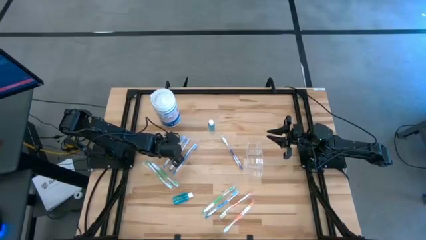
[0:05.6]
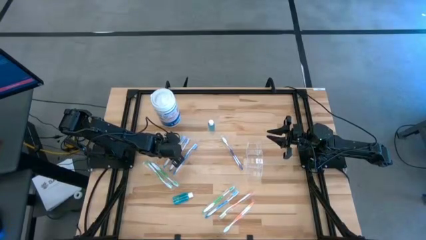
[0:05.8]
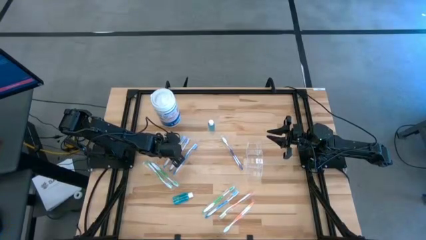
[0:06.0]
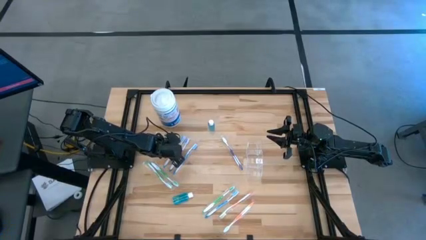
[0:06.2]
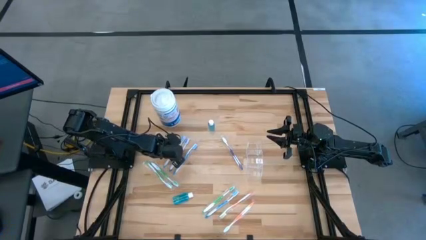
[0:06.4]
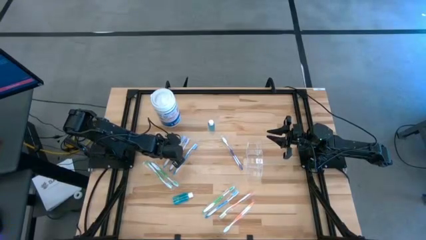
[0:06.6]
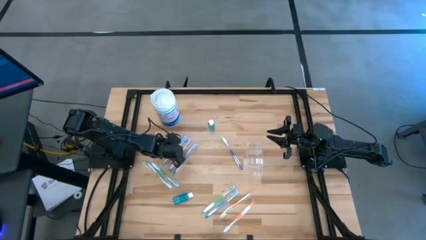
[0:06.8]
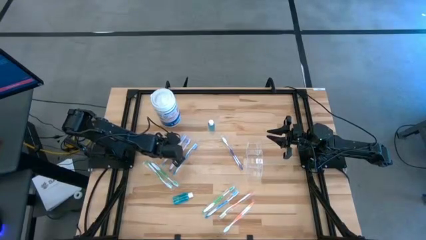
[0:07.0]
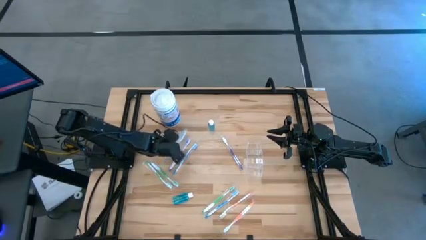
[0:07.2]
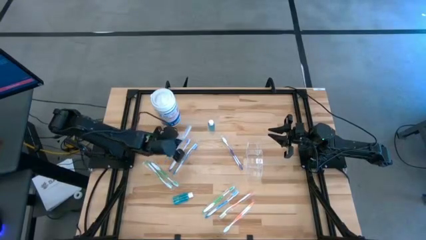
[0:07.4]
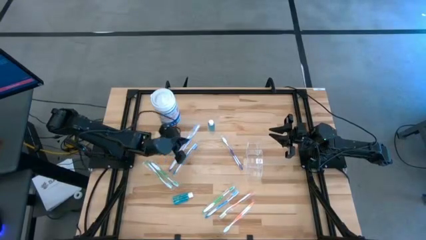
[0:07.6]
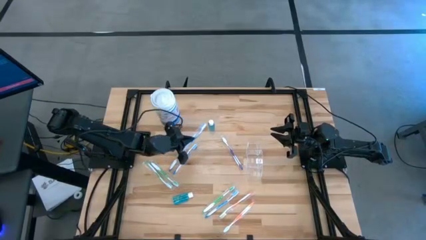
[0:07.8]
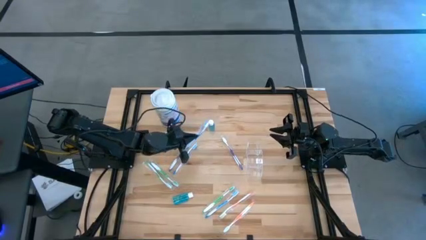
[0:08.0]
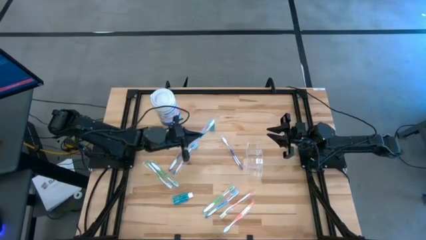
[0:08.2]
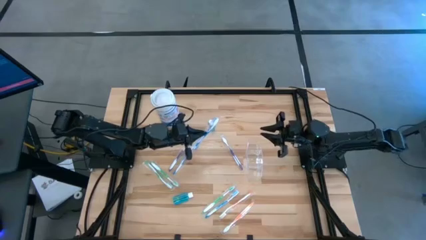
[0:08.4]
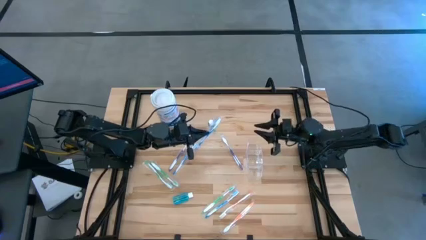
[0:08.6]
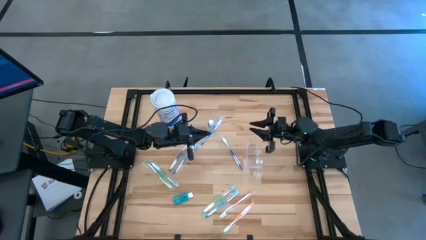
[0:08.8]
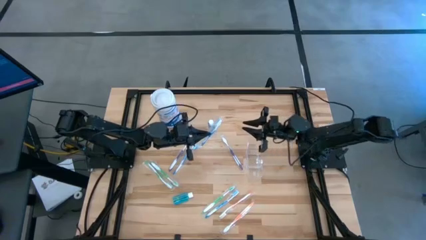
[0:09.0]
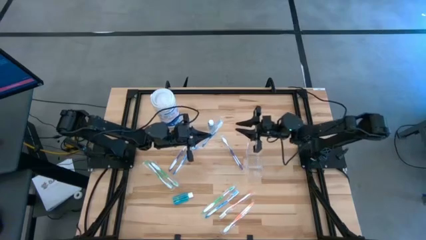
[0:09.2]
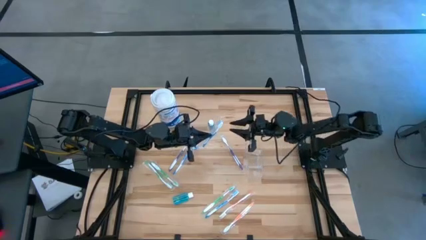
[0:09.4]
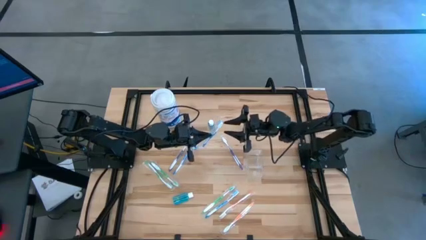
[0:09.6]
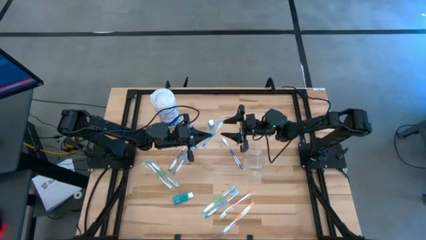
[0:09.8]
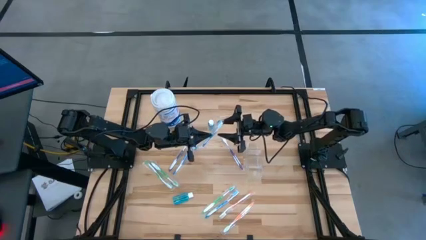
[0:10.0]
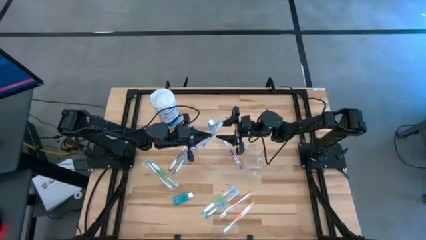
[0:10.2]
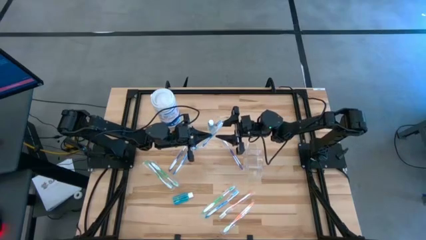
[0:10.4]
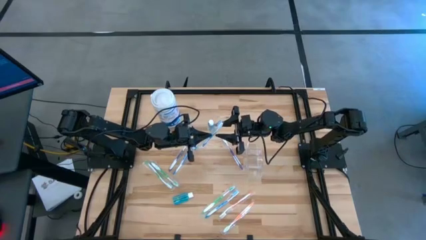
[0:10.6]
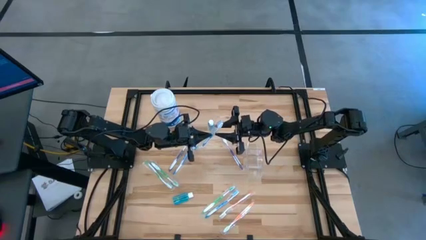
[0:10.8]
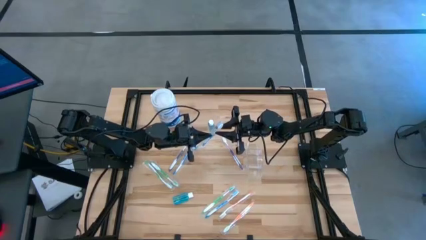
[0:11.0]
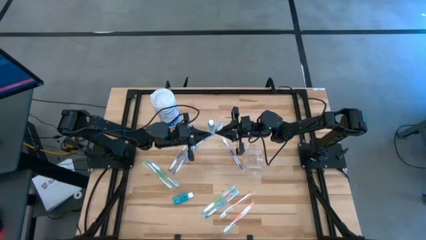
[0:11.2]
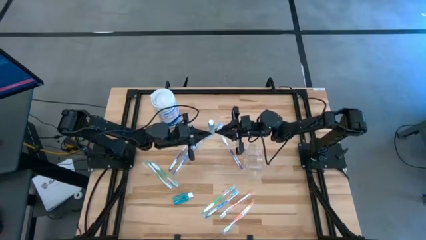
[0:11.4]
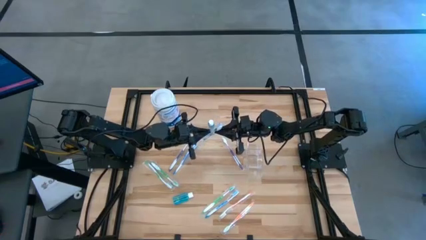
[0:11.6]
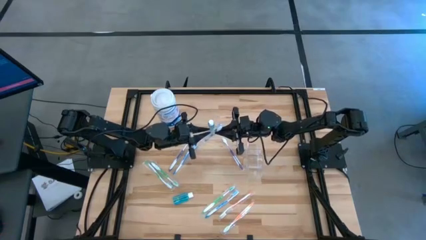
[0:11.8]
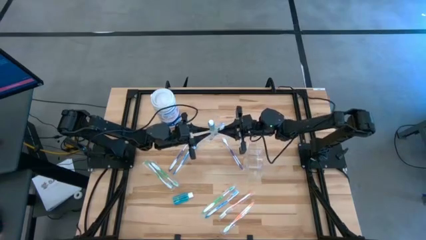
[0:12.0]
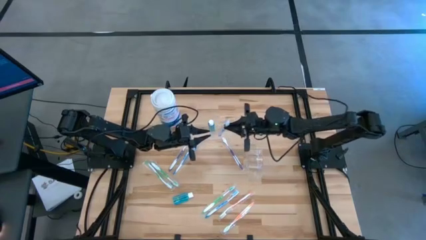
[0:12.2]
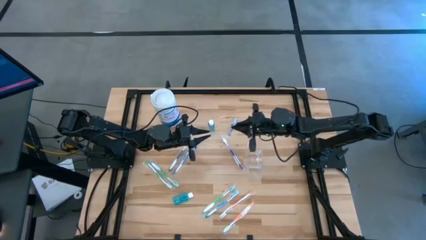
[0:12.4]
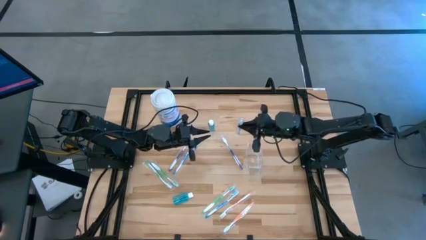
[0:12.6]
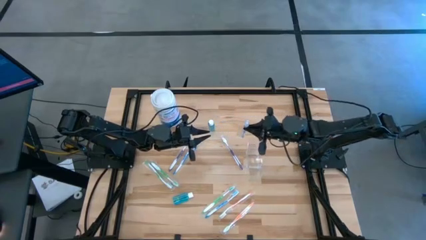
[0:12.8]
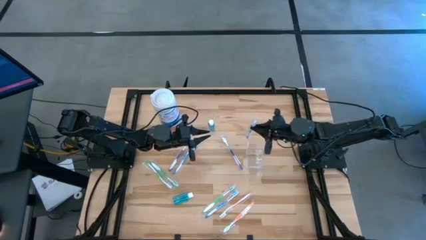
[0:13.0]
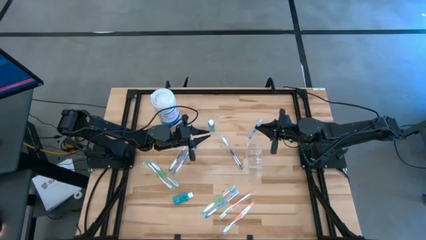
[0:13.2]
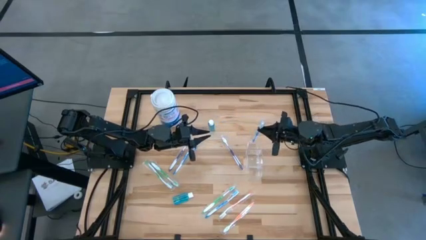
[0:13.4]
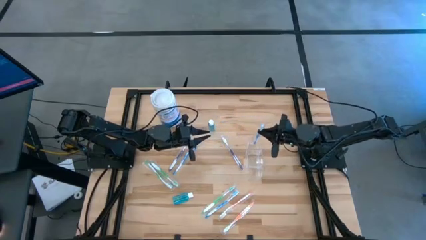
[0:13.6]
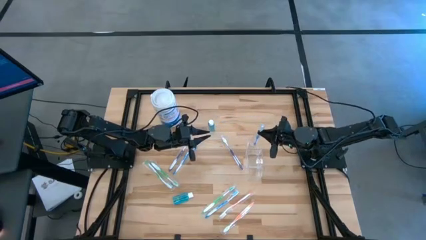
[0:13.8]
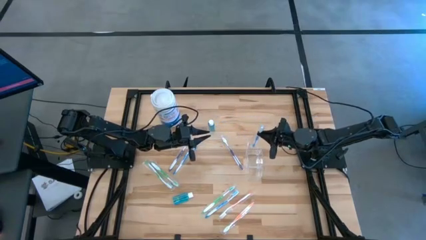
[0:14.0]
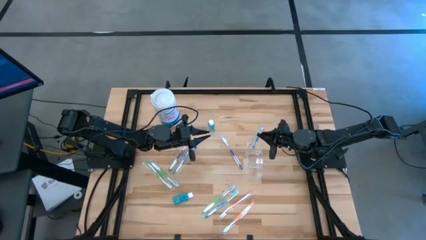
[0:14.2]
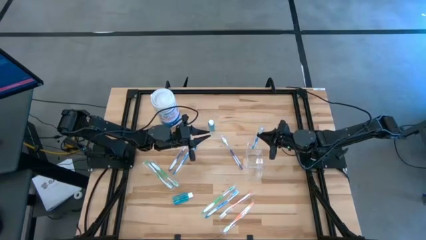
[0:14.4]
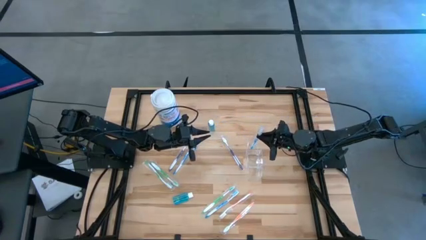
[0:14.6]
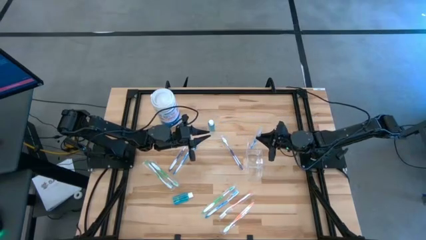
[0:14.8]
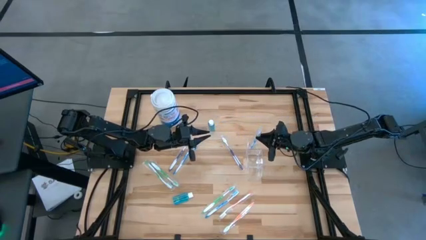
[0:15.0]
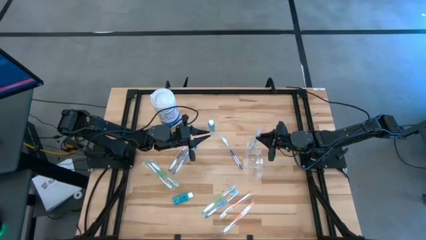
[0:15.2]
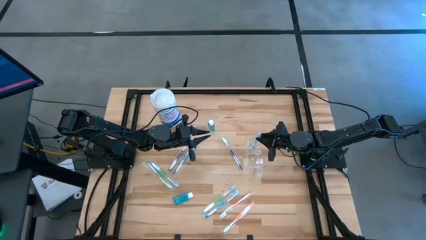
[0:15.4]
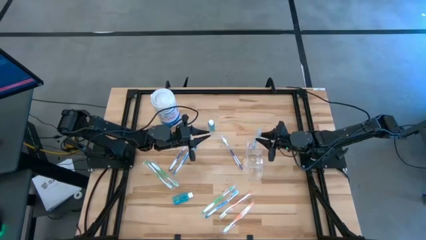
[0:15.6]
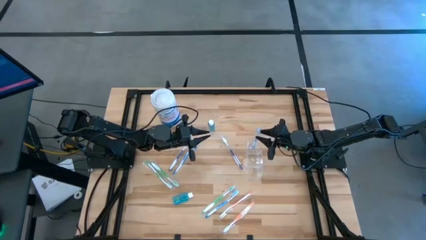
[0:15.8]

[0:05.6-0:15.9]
Task: Pick & Place toothbrushing station
Put the blue toothbrush into the transparent organizer
